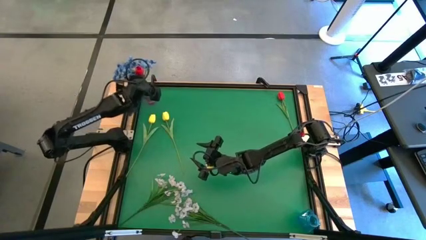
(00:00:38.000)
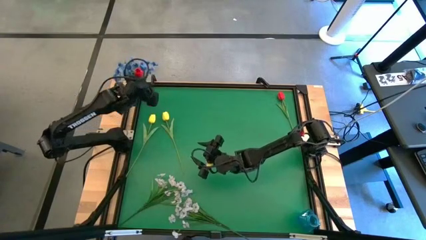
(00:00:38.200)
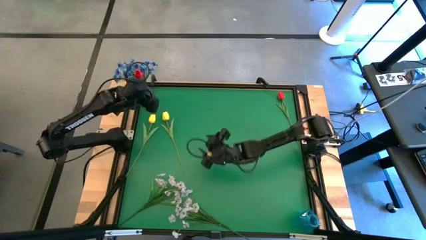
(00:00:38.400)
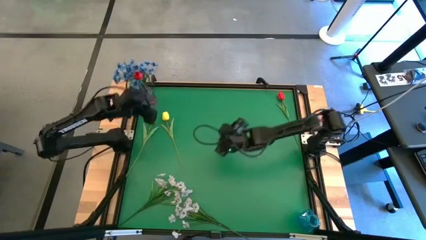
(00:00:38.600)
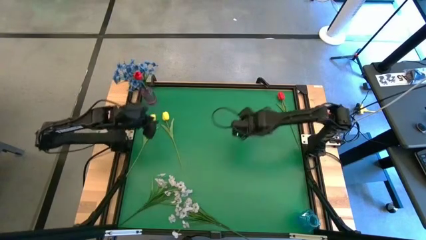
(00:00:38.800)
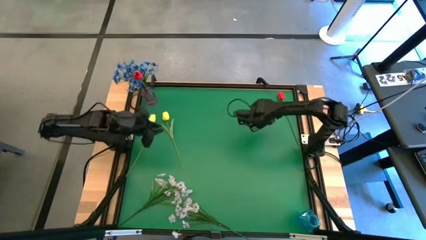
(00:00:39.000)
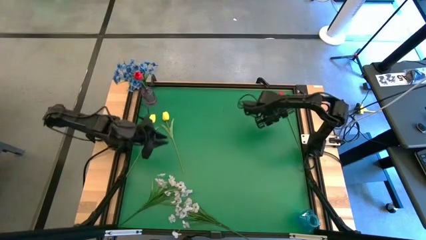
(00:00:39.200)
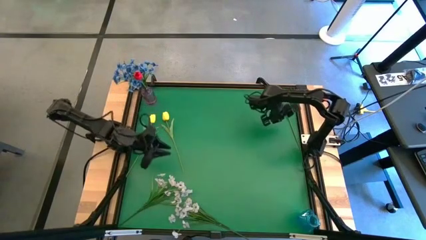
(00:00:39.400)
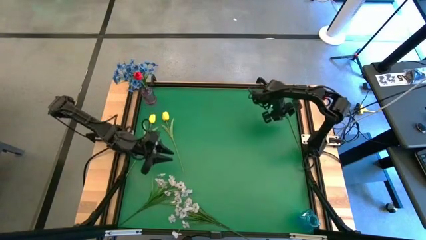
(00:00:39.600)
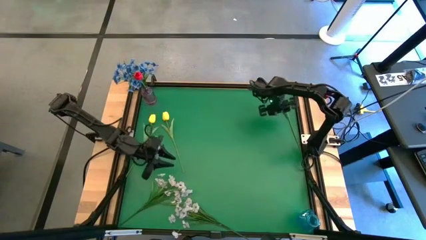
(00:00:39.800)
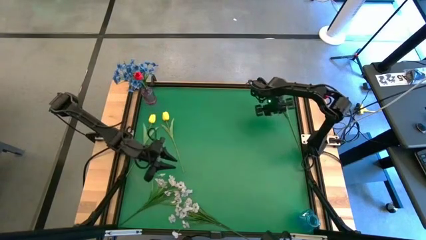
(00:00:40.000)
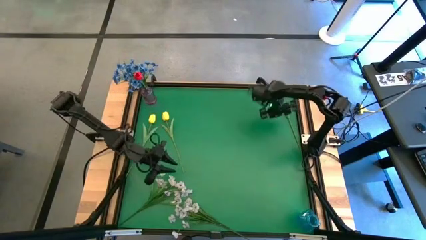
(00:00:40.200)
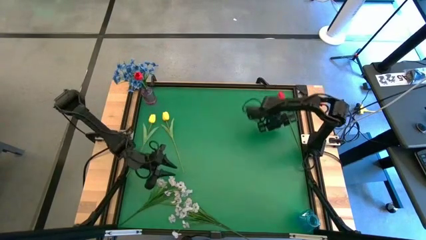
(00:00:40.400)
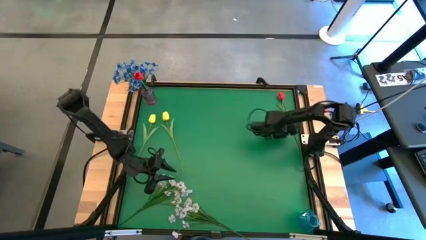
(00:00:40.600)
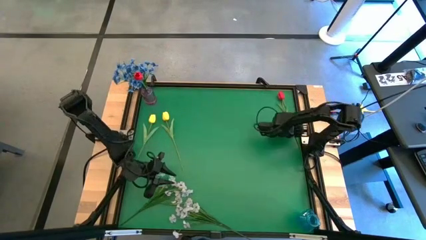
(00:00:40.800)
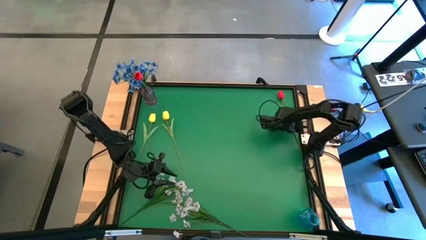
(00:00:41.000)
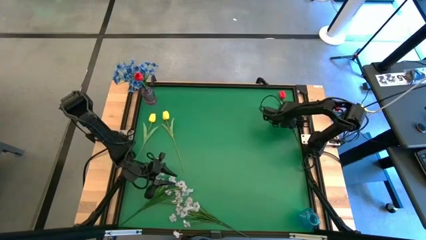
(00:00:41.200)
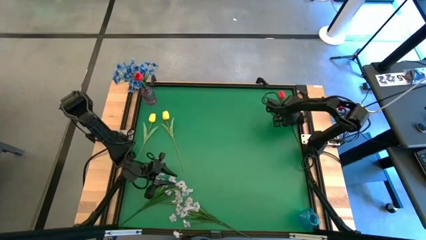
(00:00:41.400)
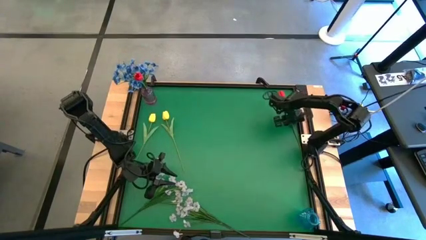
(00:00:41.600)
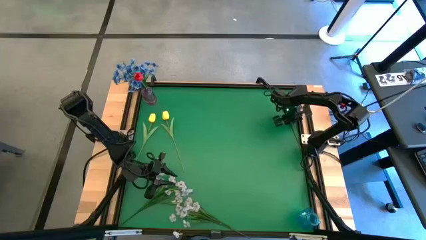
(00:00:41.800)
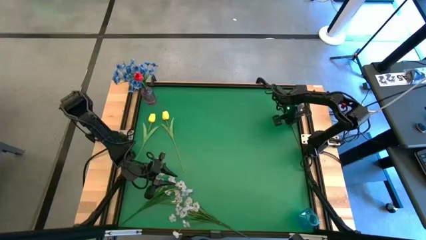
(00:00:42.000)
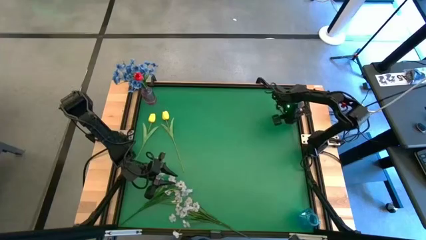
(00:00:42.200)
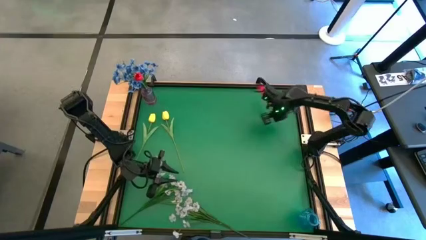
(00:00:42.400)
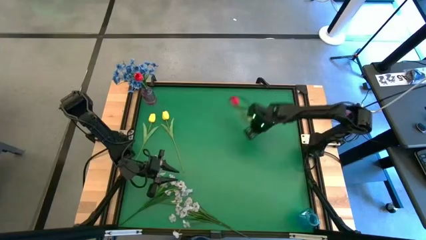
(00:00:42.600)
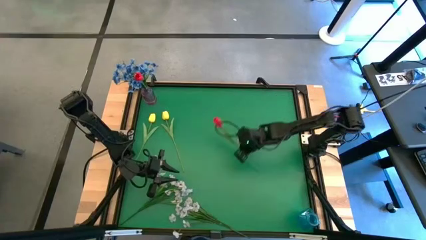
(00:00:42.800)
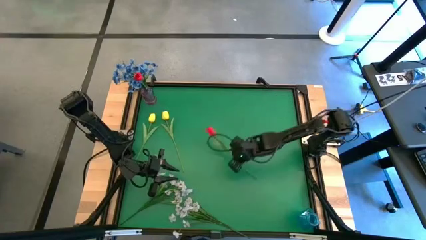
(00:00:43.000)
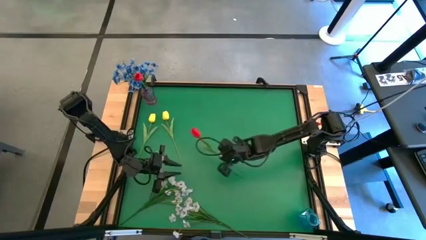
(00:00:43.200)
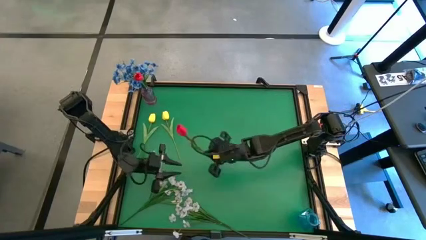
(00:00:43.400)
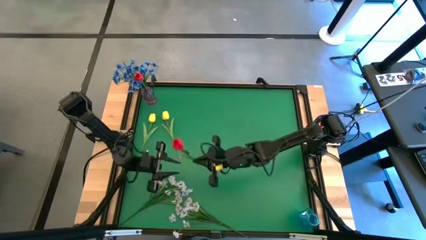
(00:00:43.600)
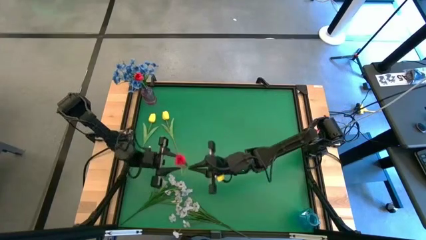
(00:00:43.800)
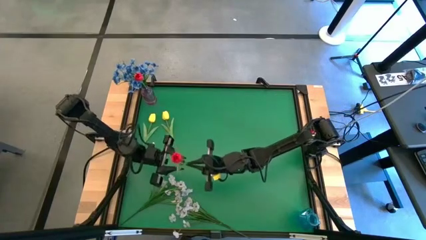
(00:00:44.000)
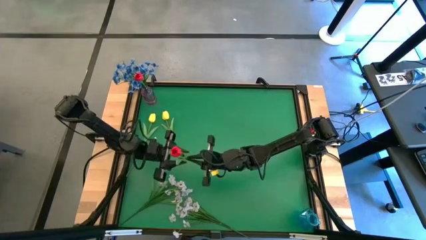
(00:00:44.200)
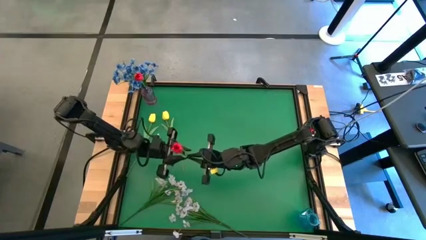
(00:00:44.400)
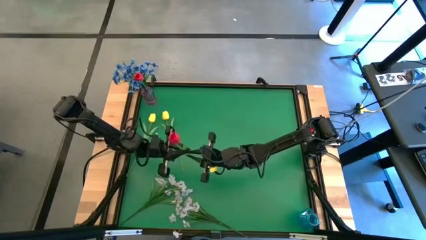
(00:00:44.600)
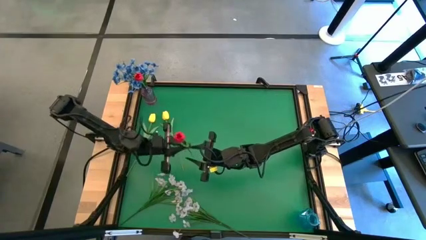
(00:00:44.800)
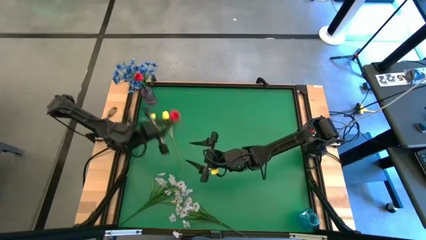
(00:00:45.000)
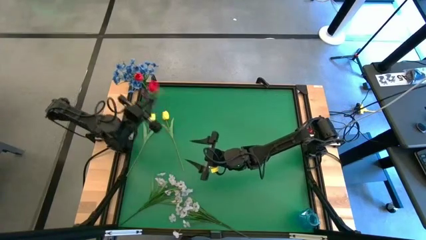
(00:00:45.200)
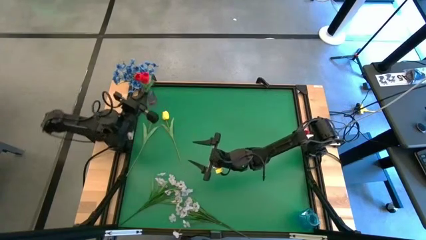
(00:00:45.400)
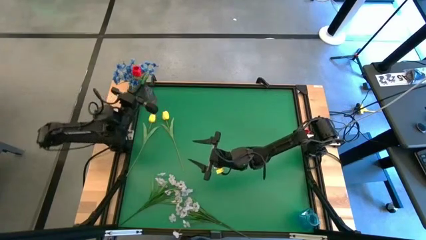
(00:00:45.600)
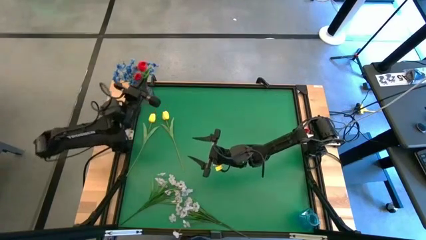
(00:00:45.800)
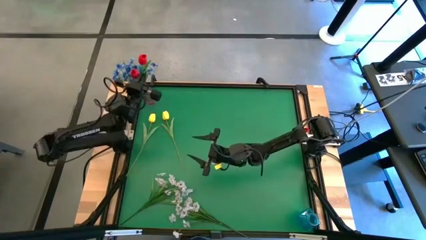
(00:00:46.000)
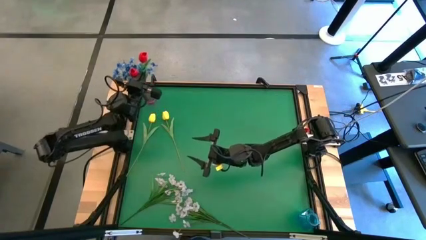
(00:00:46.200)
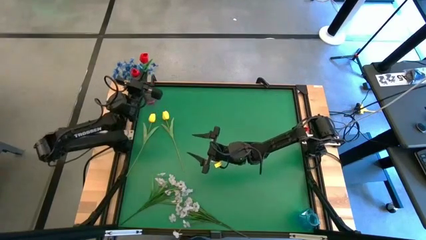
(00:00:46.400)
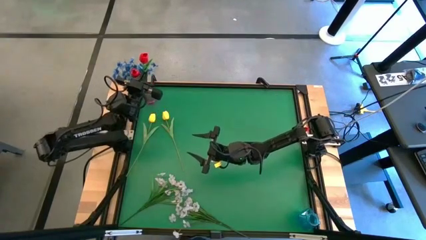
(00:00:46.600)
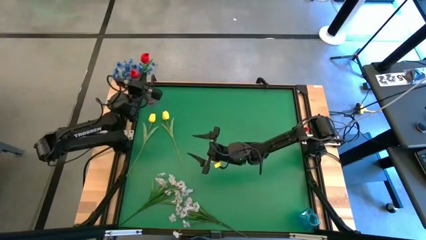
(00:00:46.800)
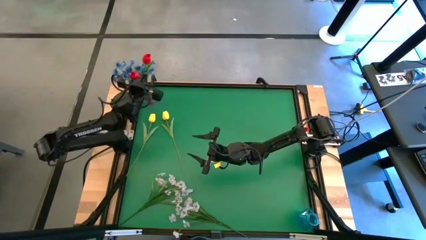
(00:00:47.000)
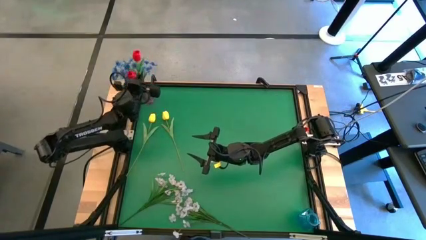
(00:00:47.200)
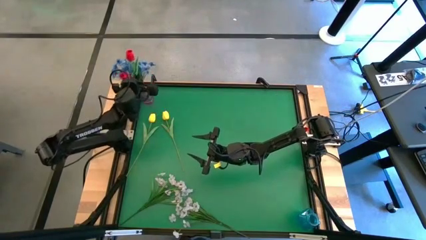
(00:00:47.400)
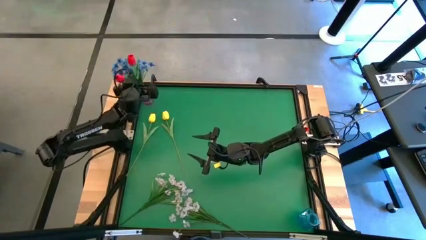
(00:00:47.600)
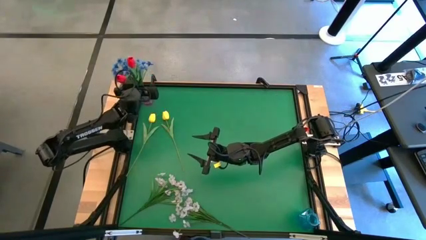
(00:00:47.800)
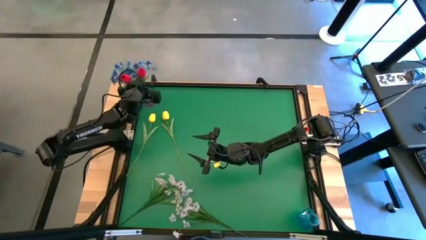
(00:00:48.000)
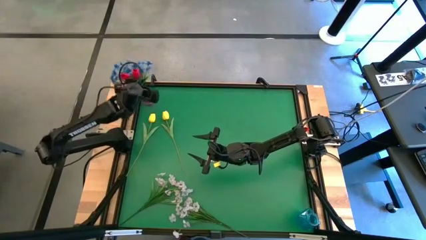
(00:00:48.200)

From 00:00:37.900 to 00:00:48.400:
Task: Sort flowers into vase by color
Put the red flower into the purple vase

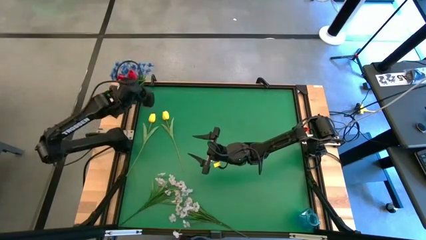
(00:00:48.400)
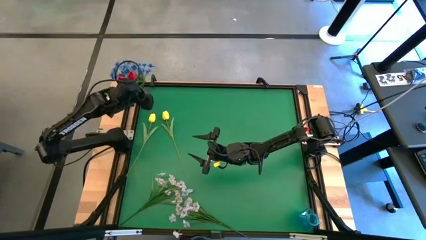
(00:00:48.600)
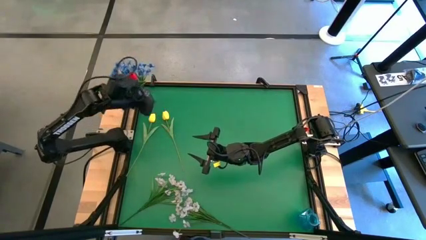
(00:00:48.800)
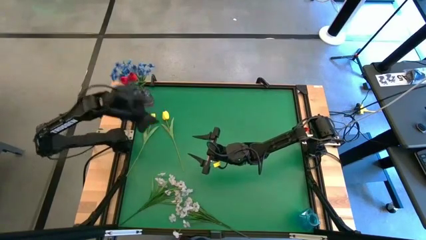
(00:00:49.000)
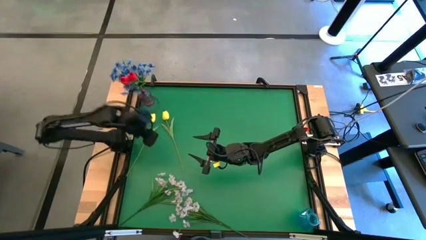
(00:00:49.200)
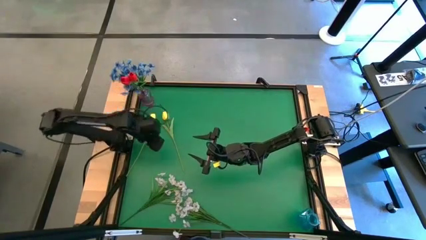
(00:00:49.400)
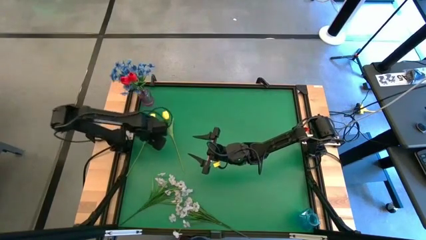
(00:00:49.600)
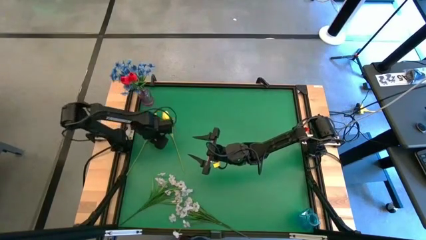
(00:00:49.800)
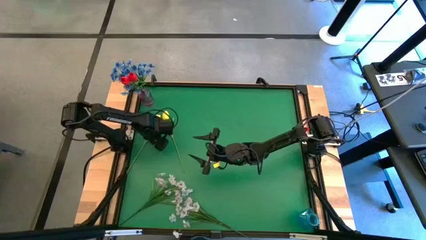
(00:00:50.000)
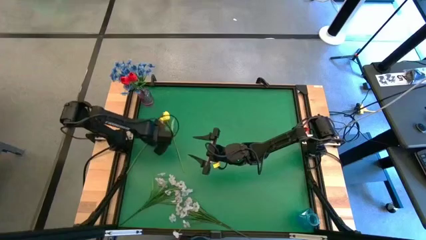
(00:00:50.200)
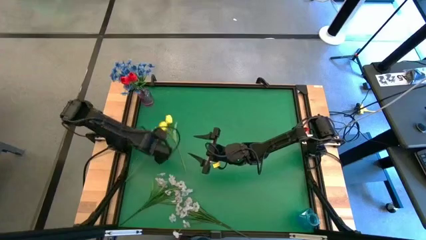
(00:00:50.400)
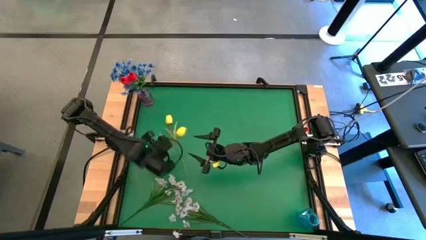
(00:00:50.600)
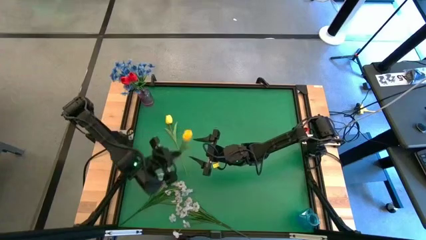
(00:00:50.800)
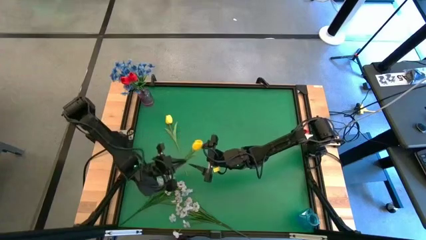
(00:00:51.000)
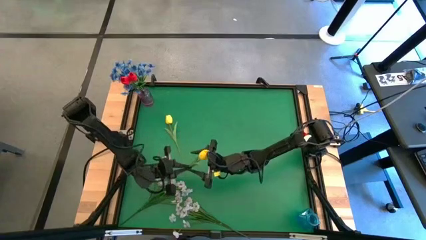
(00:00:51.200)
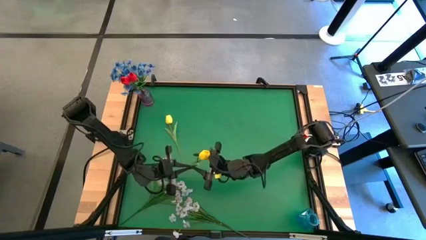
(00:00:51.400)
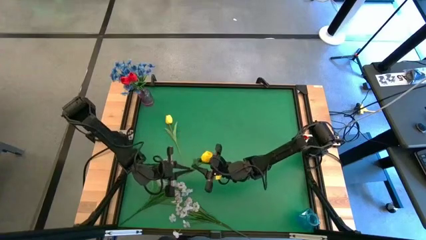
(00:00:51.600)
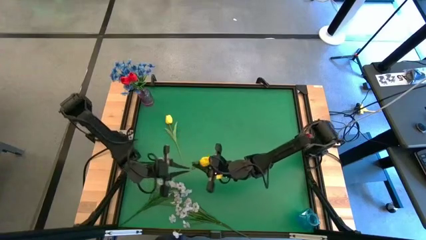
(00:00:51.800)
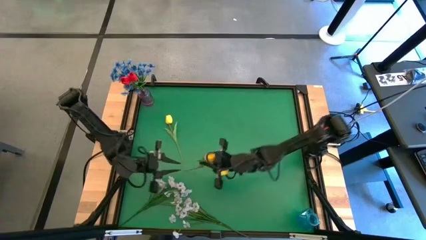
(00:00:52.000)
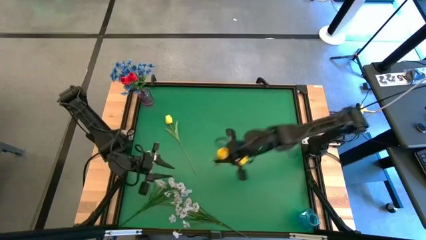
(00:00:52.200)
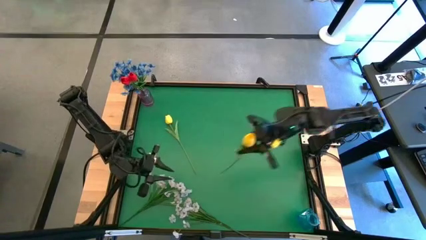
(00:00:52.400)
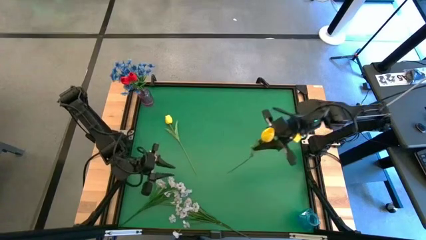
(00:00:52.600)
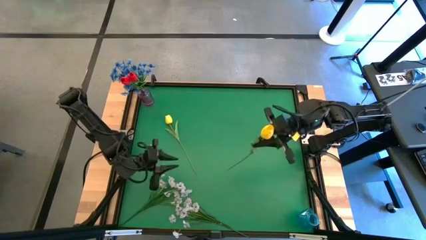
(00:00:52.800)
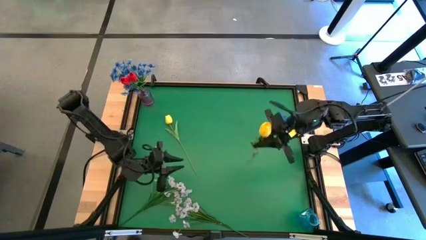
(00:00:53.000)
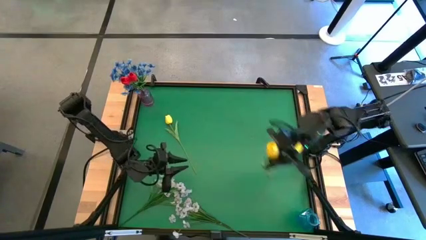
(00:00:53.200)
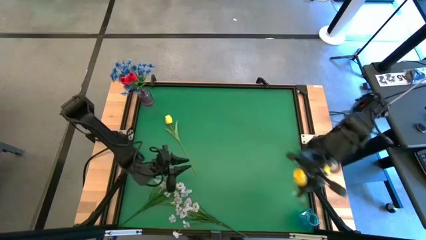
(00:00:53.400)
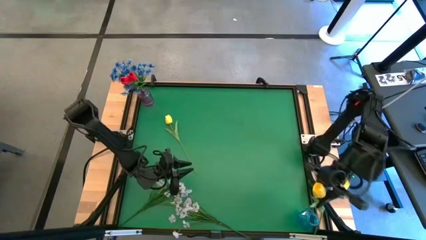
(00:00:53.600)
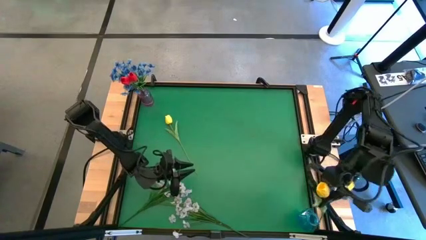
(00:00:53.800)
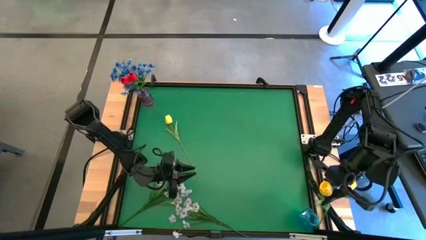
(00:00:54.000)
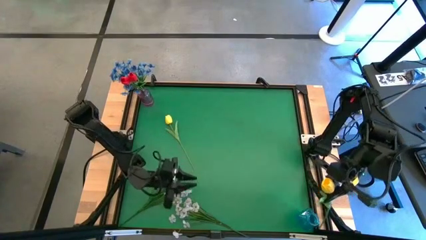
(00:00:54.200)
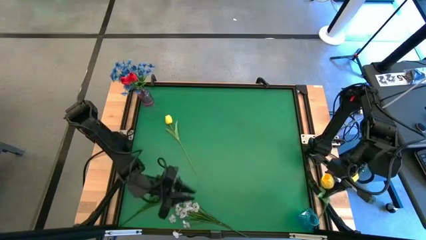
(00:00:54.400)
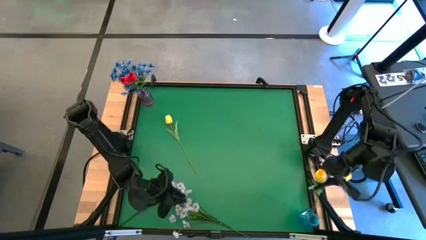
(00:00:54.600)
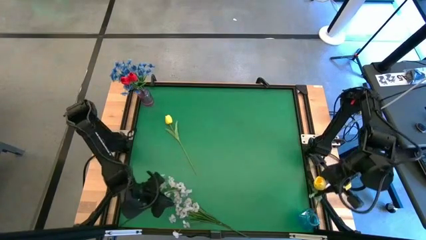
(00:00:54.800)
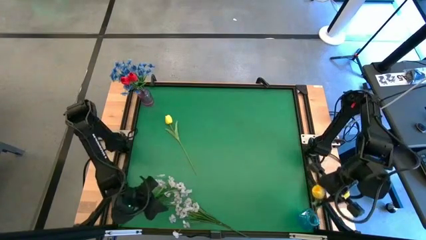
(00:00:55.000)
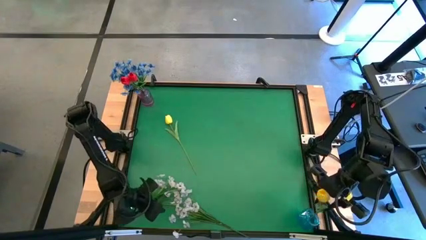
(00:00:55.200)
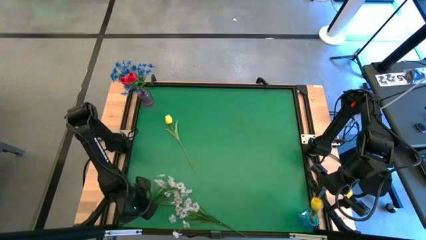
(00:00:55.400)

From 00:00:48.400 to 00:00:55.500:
Put the left yellow flower into the blue vase
